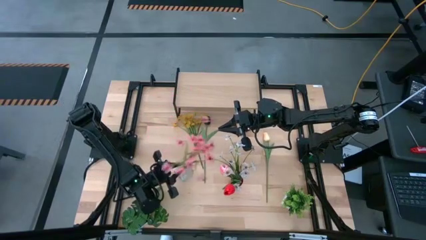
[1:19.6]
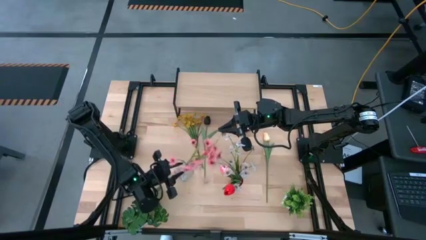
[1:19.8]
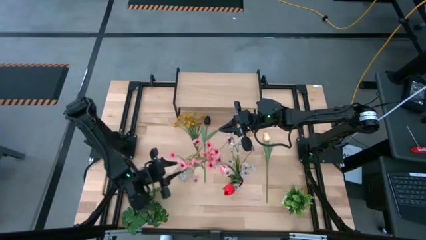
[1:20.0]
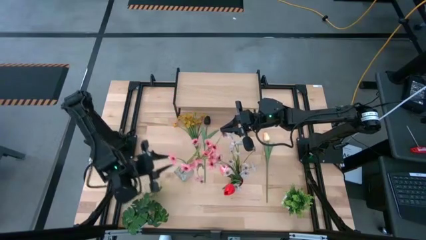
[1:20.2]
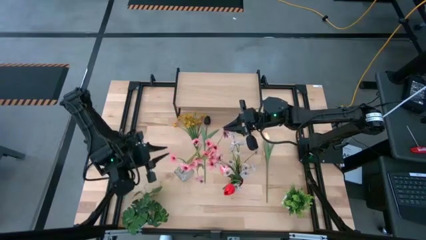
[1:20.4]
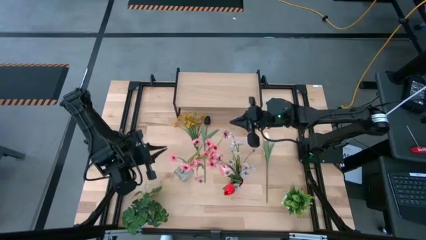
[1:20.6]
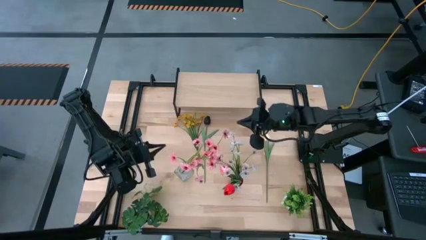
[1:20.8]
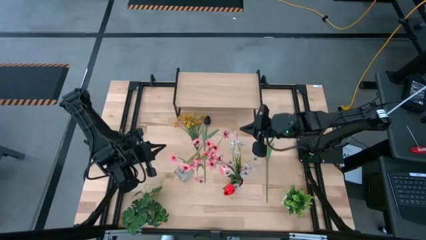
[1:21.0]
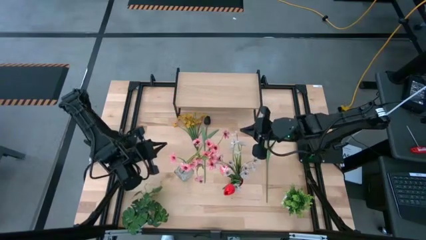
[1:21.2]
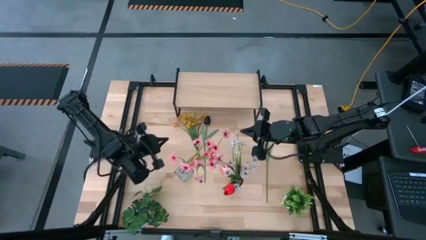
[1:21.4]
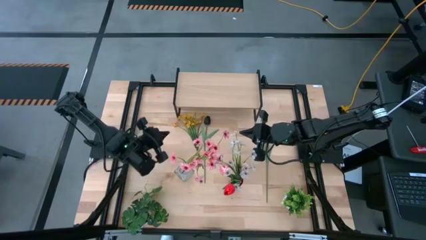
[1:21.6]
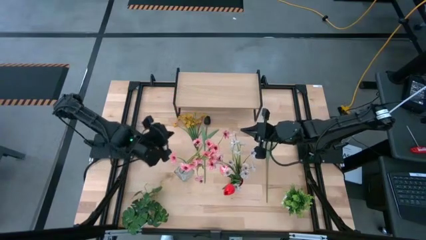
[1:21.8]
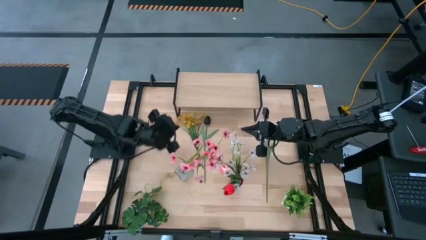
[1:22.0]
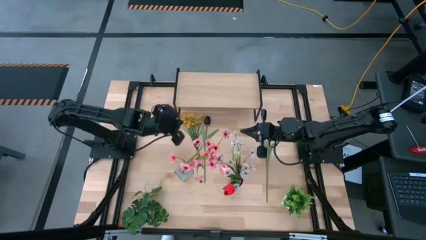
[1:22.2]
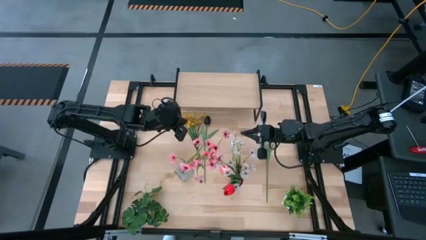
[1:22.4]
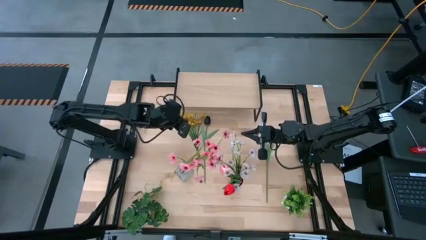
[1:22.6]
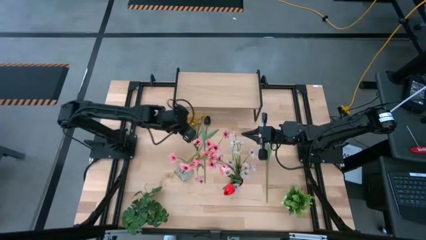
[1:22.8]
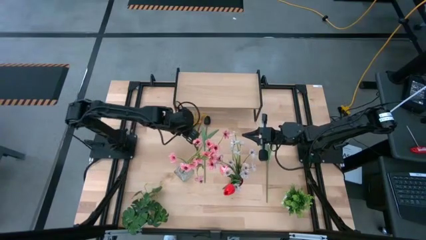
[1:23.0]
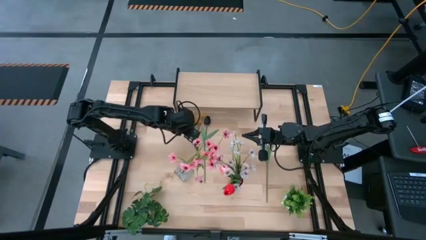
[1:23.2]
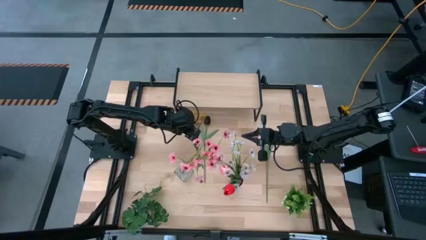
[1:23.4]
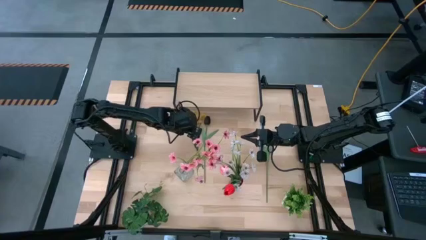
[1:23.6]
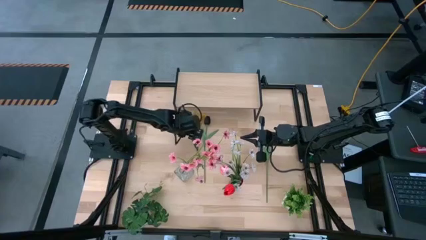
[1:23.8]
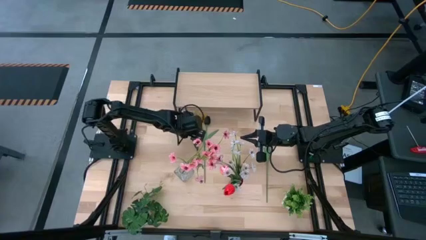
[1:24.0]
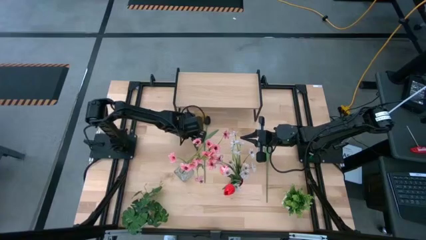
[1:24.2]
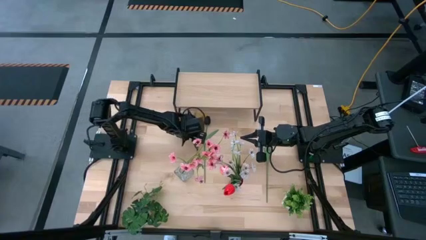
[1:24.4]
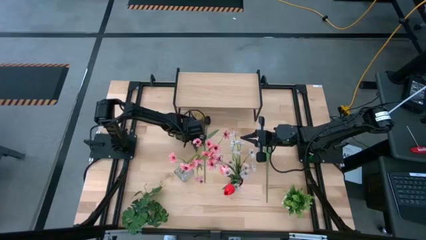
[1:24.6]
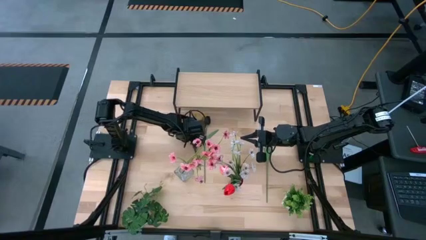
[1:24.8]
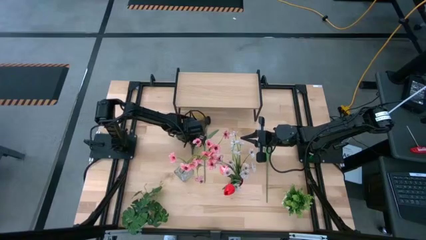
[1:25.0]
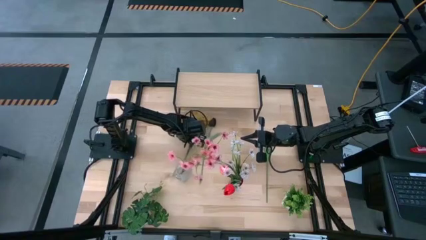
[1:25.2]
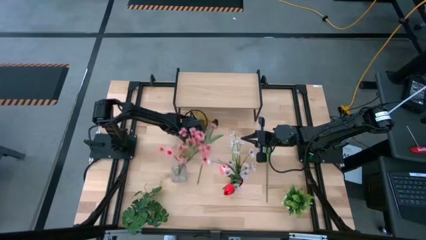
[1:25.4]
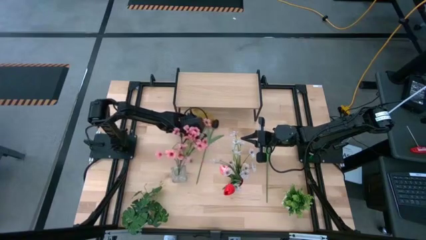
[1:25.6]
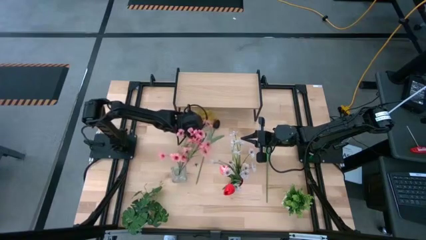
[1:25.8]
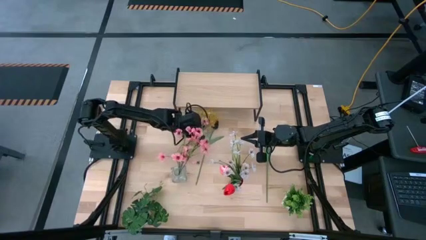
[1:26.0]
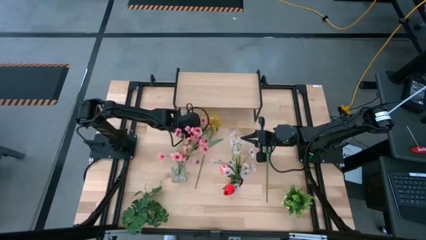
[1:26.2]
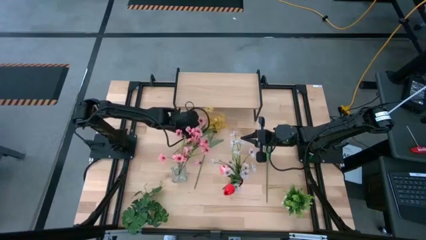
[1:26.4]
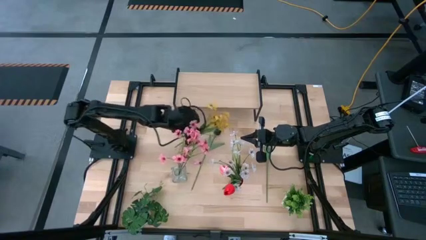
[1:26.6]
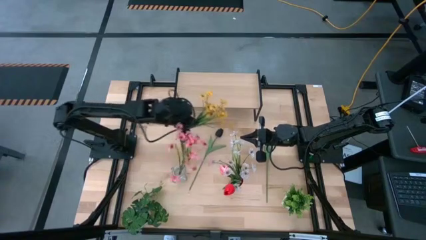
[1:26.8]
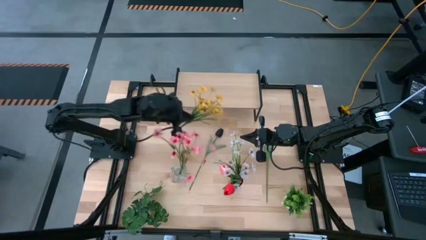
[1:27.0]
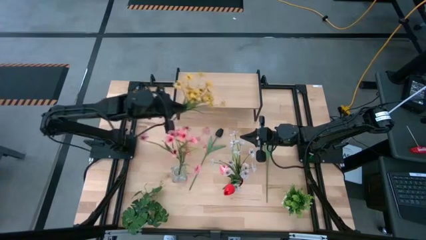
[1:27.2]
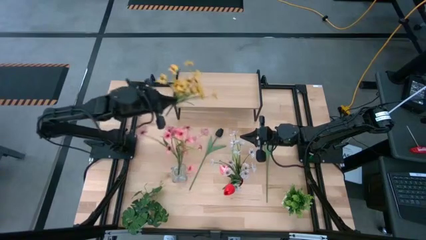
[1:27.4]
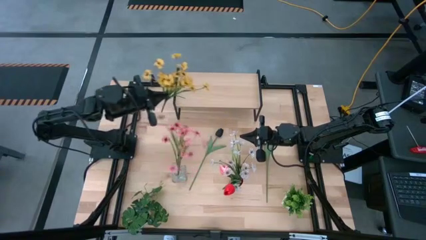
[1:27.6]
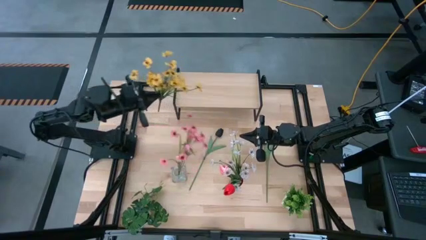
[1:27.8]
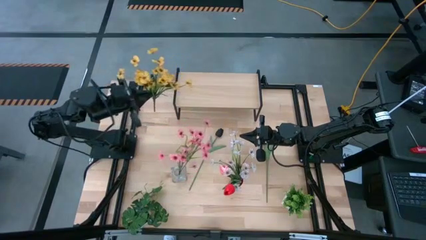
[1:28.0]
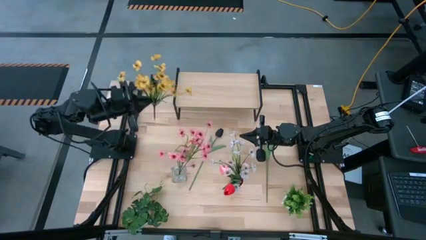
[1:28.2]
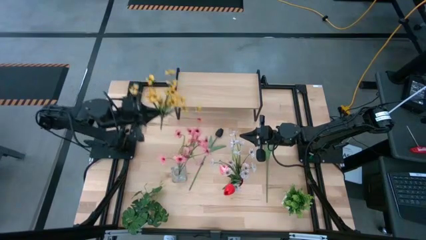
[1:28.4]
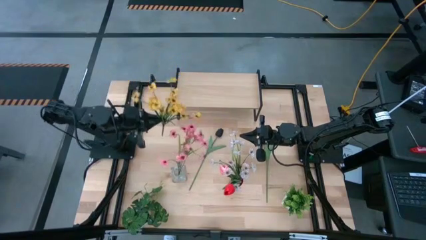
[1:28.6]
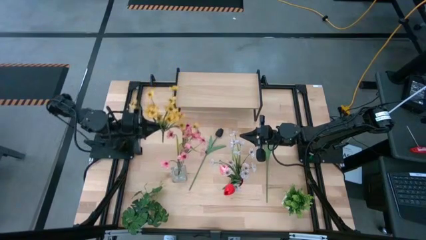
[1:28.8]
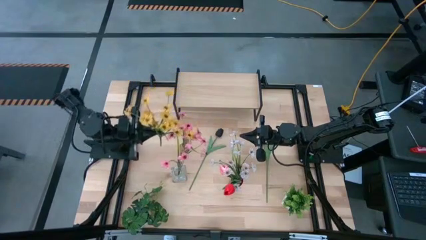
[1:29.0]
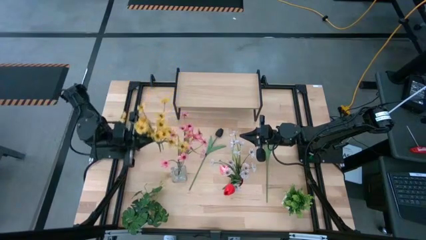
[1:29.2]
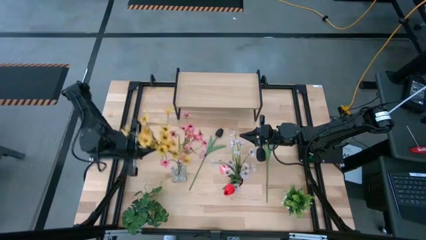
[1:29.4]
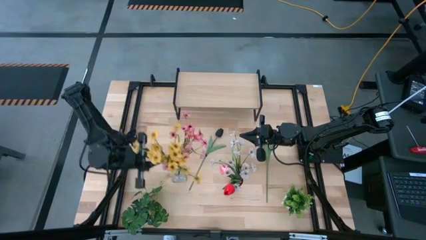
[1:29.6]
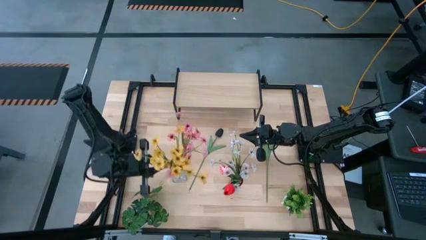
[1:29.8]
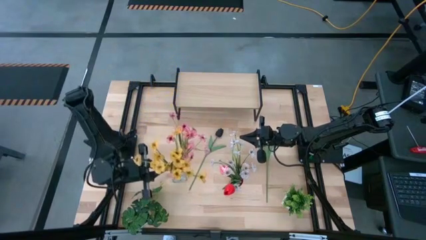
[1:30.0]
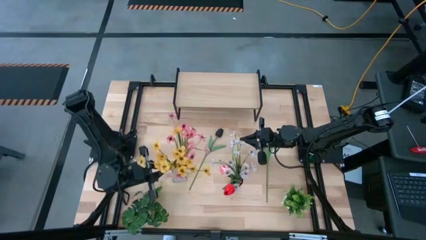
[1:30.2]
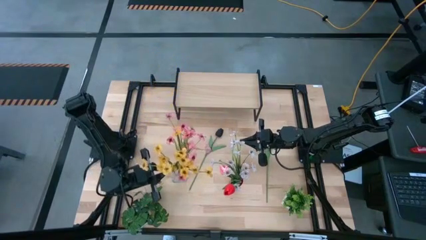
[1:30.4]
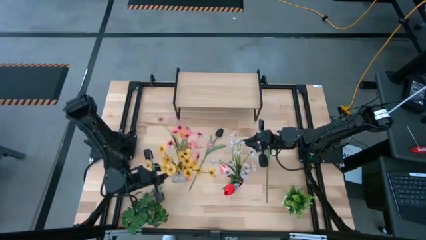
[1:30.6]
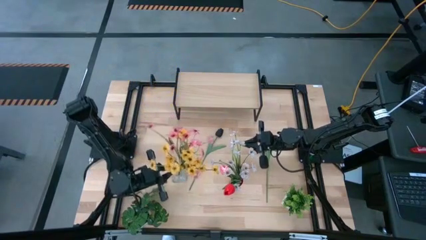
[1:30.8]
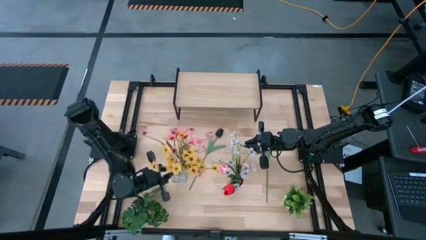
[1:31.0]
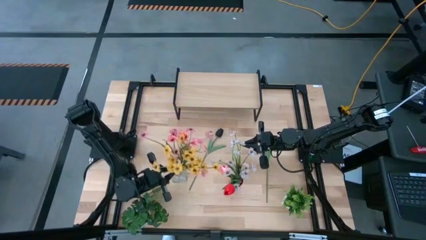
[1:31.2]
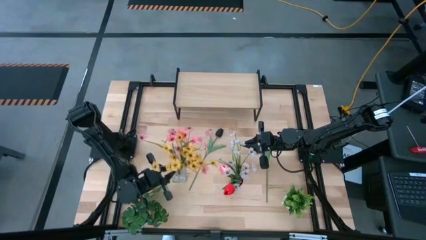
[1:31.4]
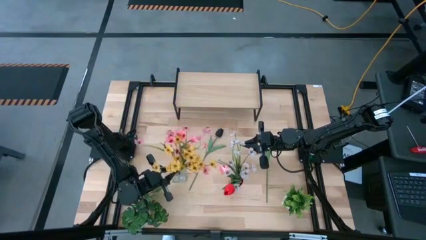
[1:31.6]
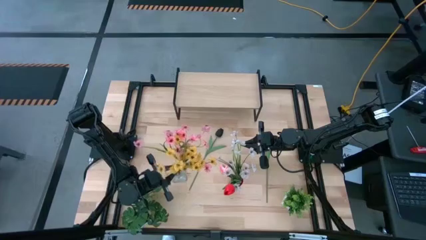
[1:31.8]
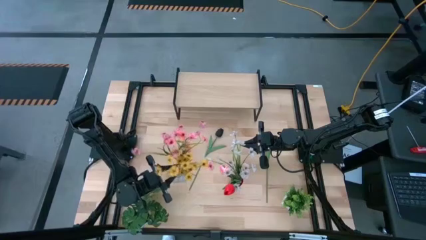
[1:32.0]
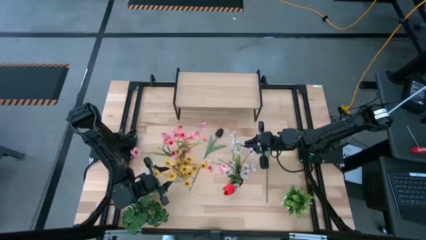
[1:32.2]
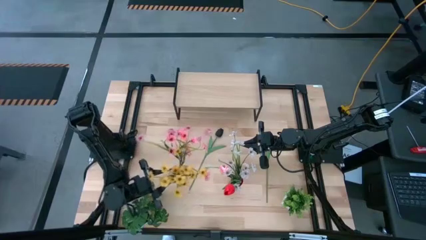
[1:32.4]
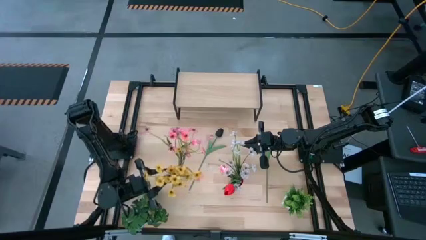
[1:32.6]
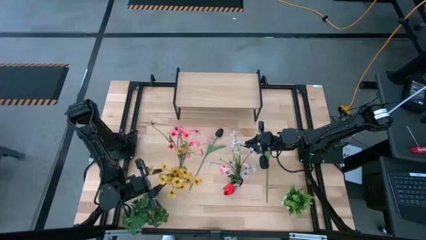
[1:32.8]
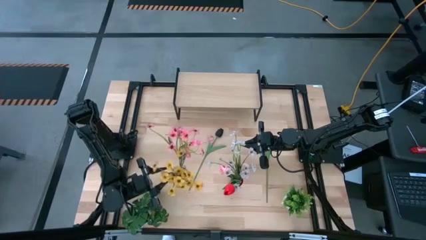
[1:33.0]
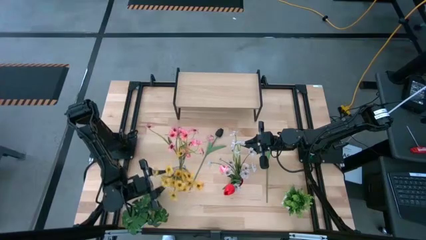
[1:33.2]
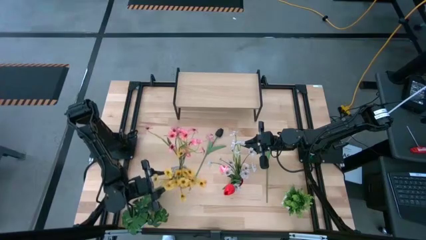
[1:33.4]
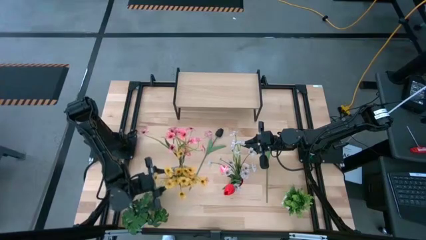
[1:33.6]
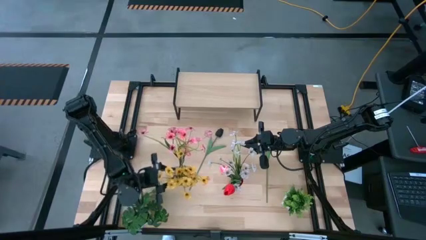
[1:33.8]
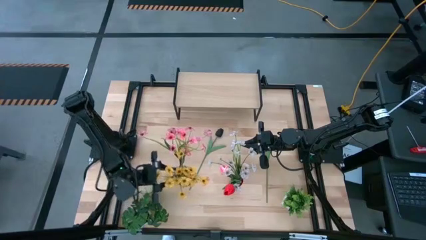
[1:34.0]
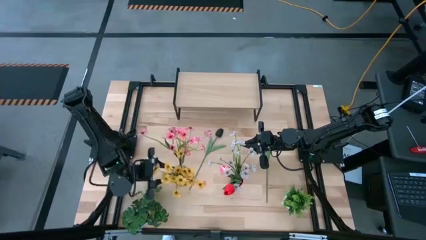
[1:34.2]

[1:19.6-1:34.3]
Task: Pick and place flowers into a vace then onto a shelf
Put the yellow flowers into the transparent vase
